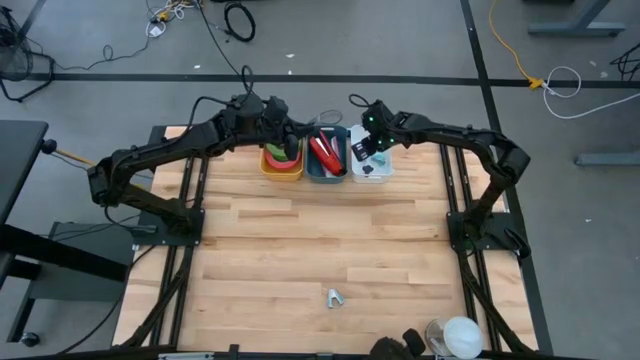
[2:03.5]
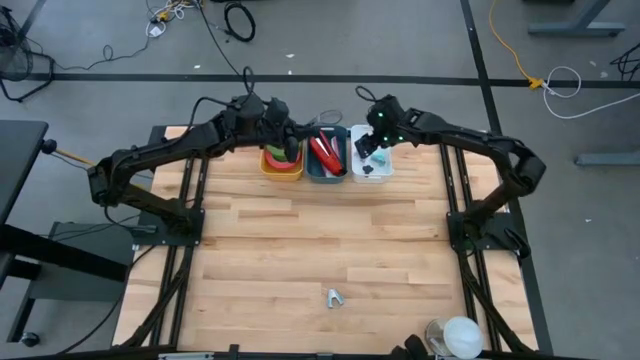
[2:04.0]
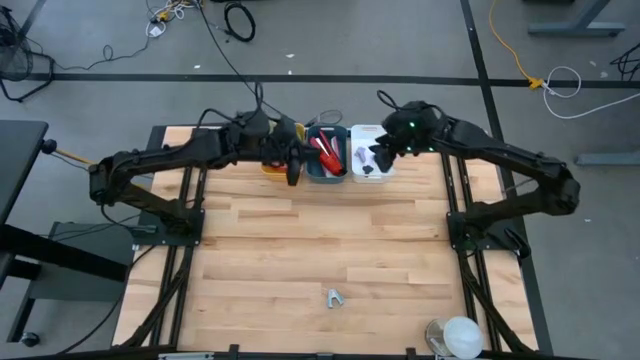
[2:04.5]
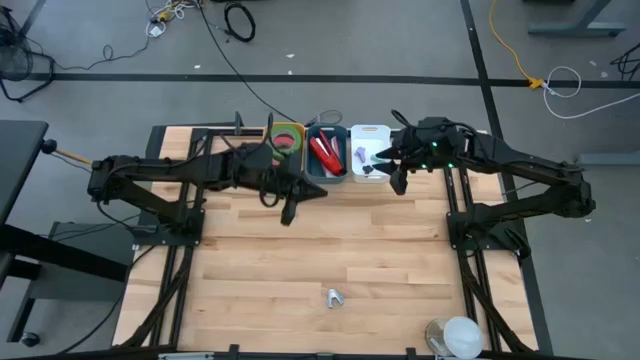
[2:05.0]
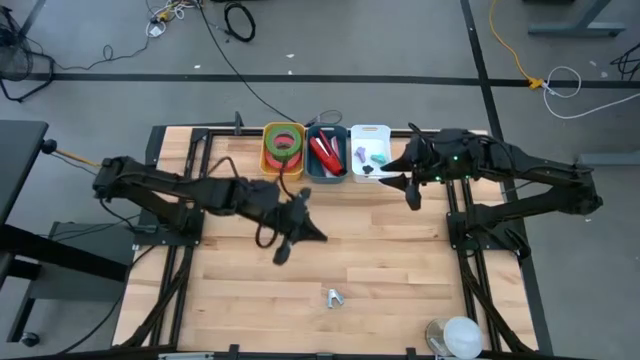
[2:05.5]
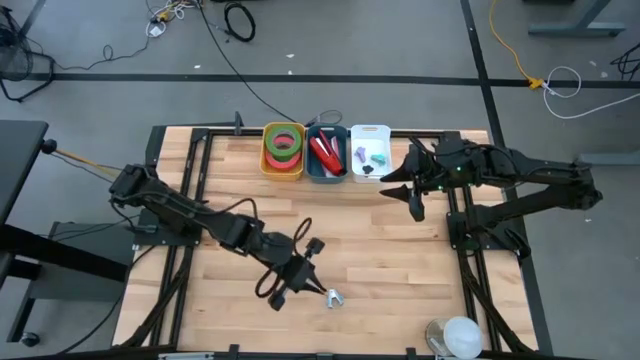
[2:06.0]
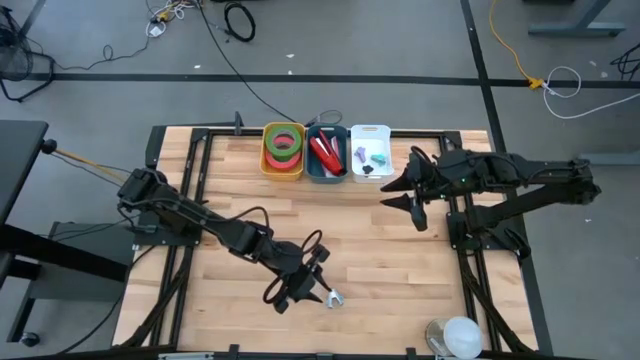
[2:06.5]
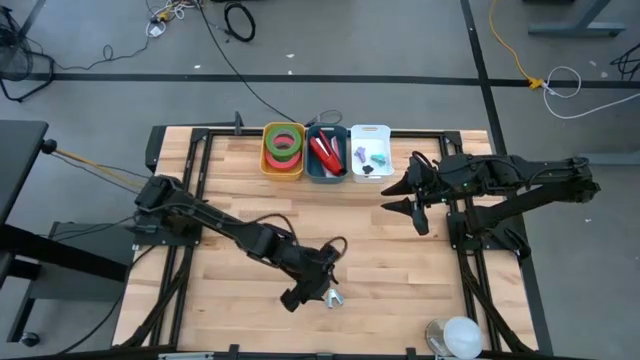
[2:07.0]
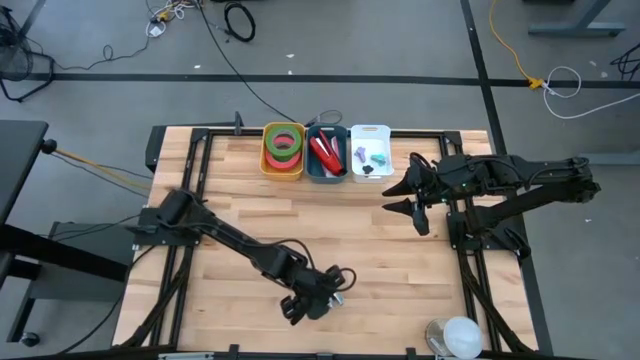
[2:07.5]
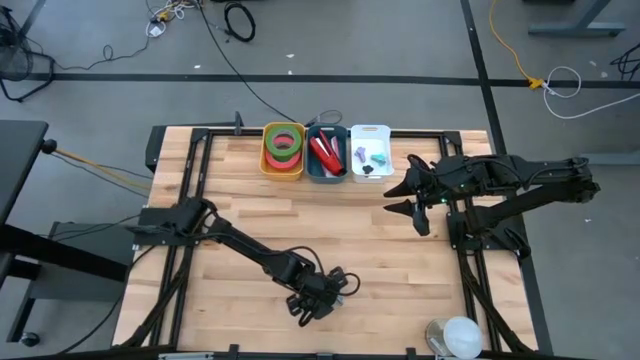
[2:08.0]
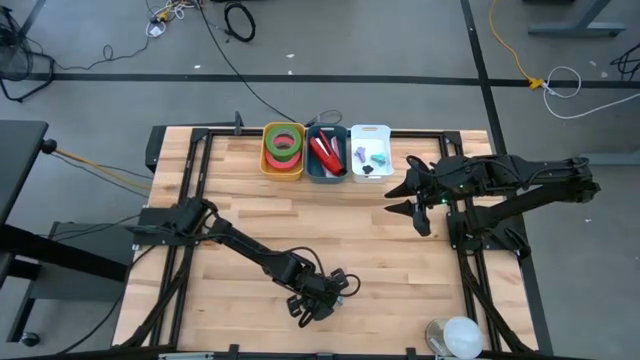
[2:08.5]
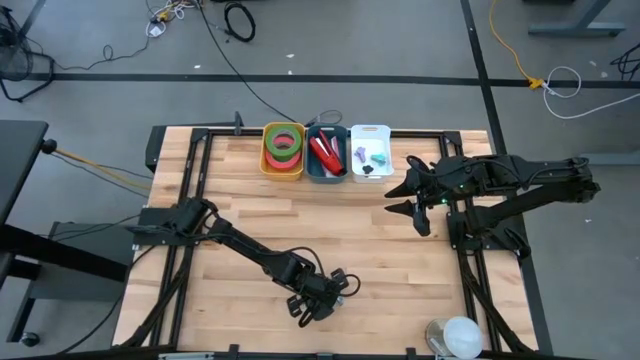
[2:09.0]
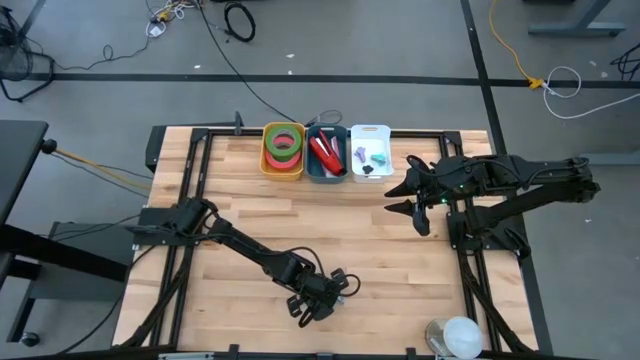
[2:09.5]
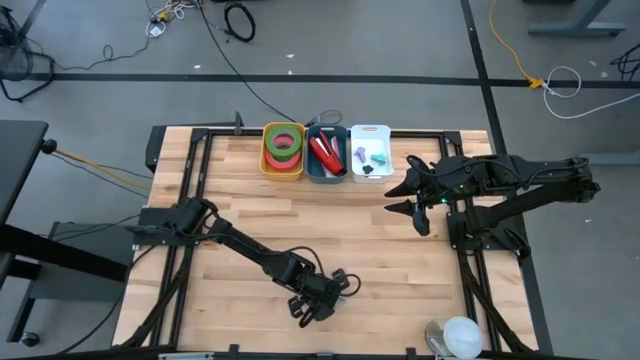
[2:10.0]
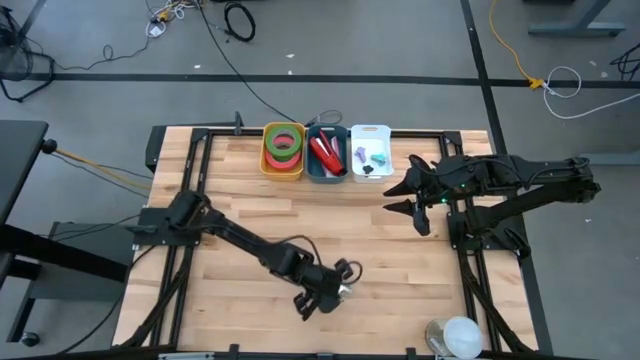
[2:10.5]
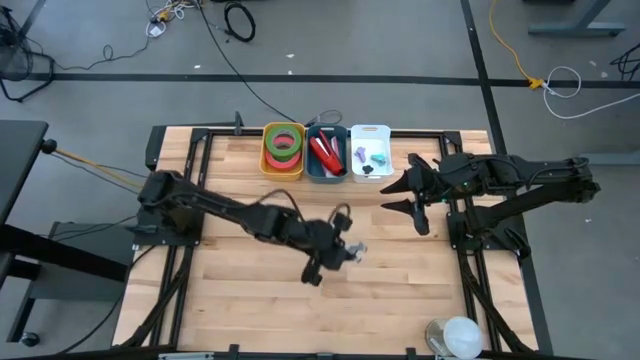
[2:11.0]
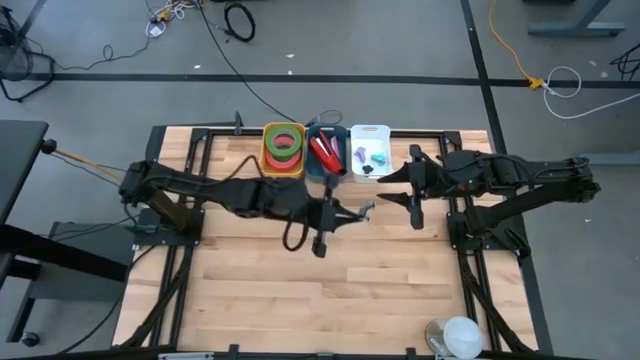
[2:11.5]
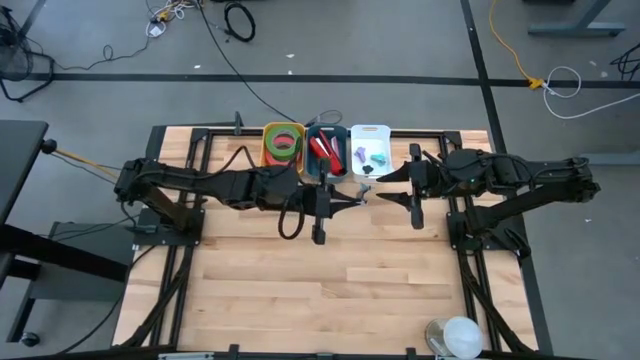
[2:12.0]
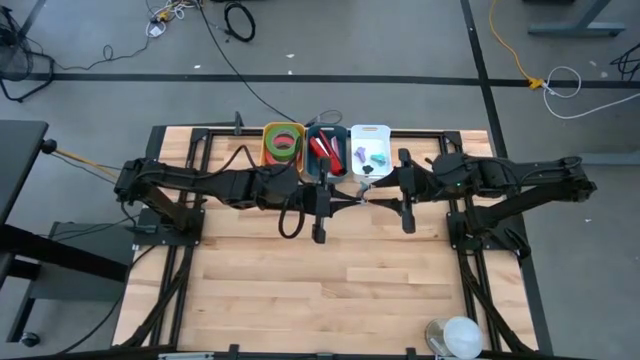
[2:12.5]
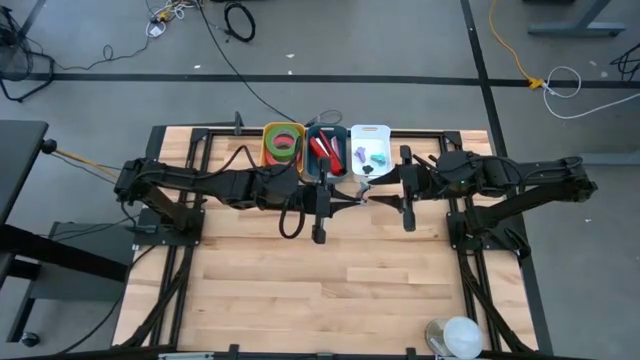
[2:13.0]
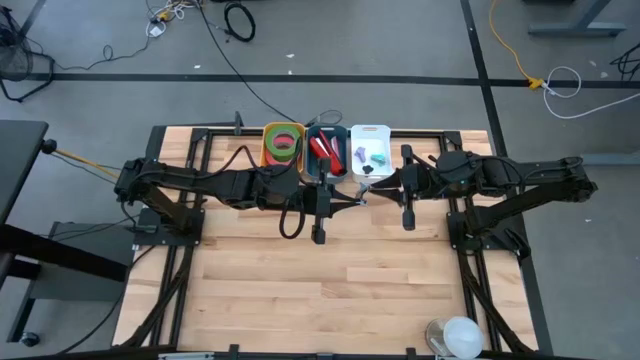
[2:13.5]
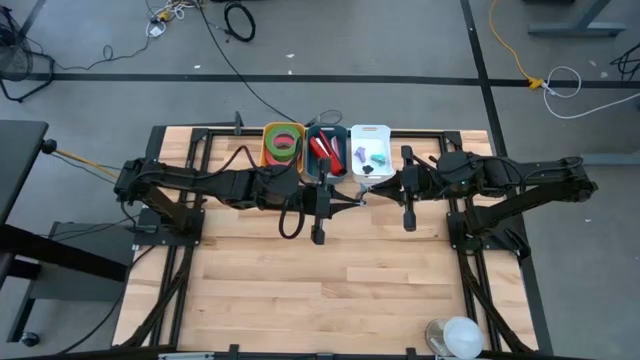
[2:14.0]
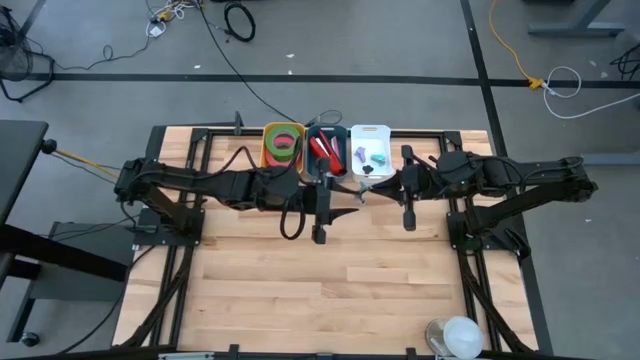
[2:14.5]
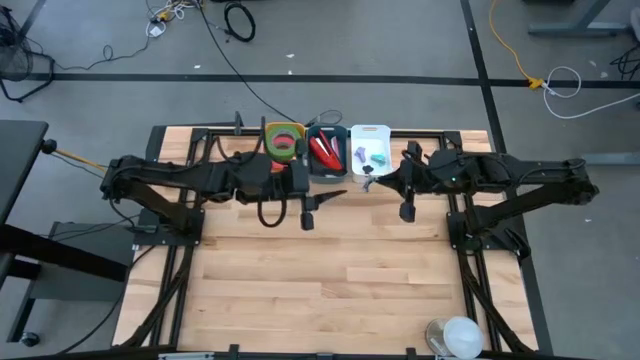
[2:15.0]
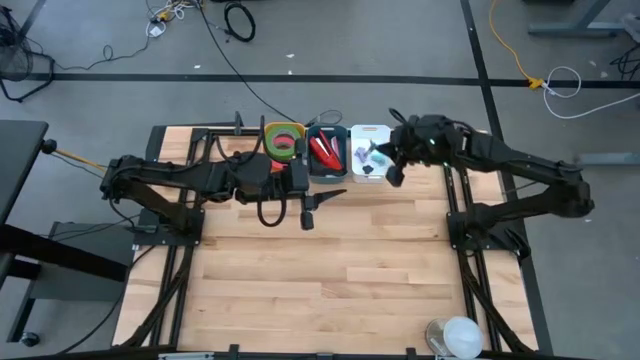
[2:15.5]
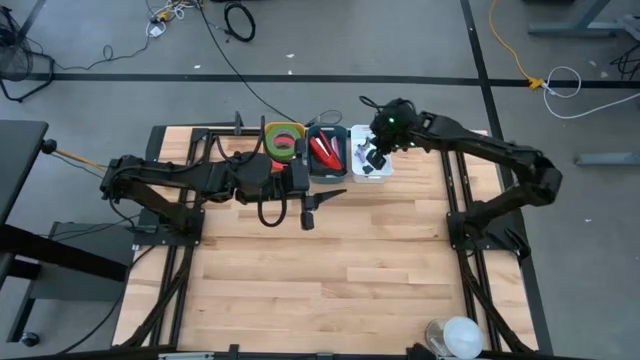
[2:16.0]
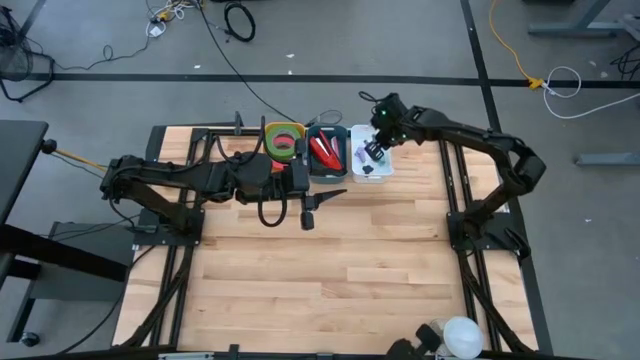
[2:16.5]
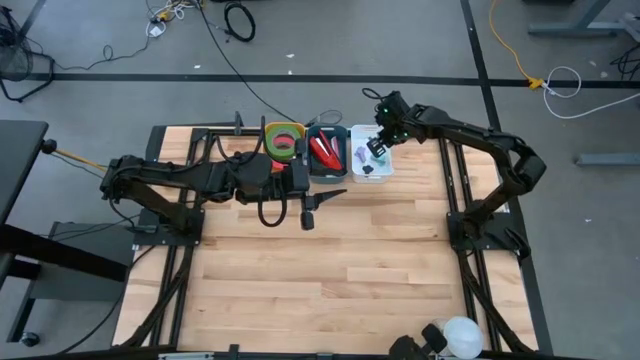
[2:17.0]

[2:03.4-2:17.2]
Task: Pick and place Stapler, Stapler remover, tape
Put the light blue staple remover into the white bin

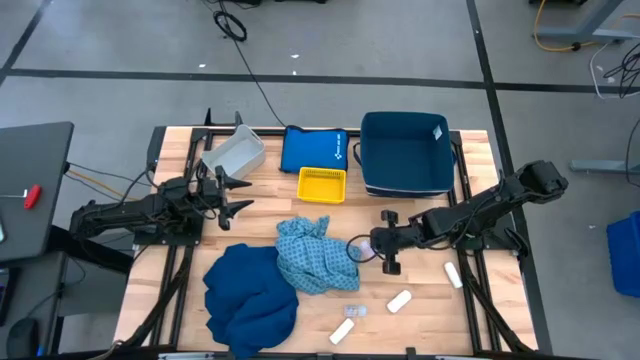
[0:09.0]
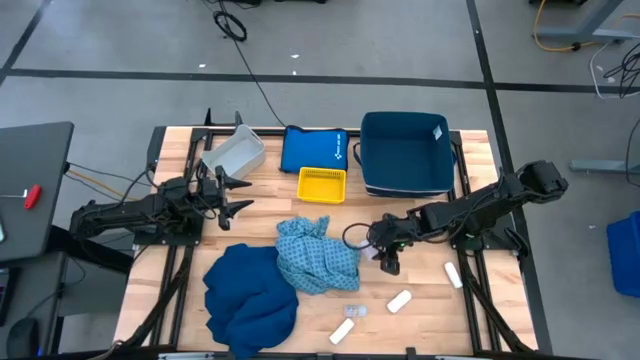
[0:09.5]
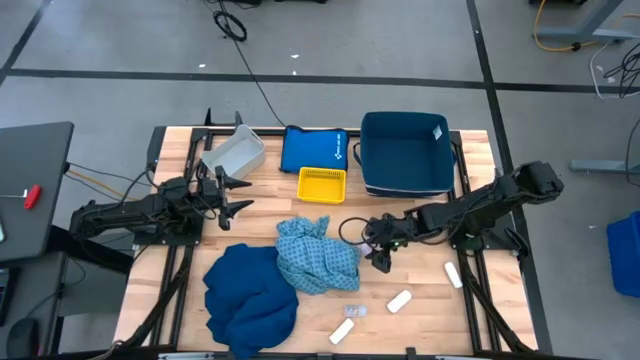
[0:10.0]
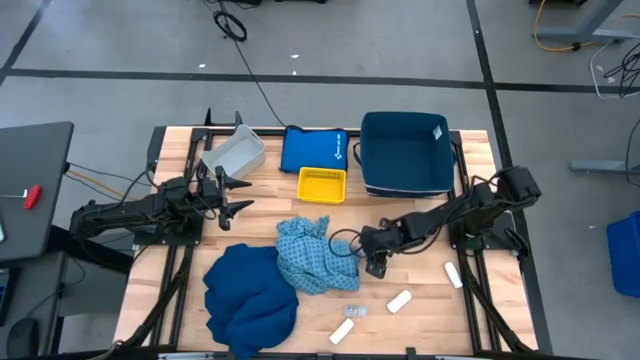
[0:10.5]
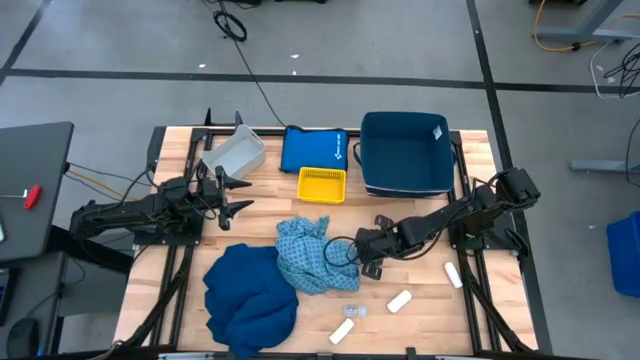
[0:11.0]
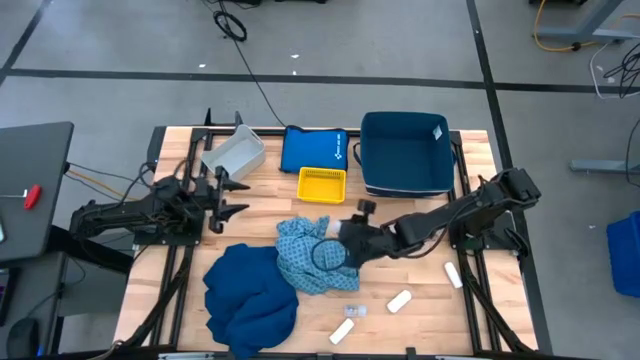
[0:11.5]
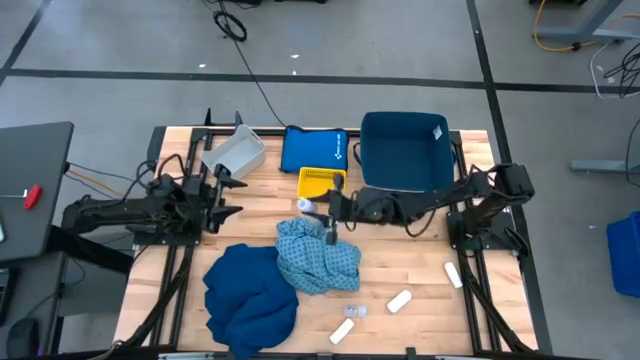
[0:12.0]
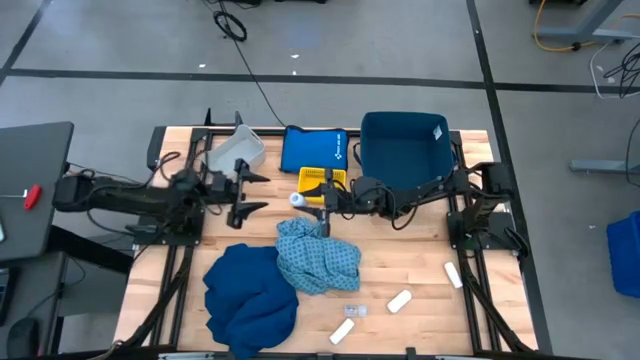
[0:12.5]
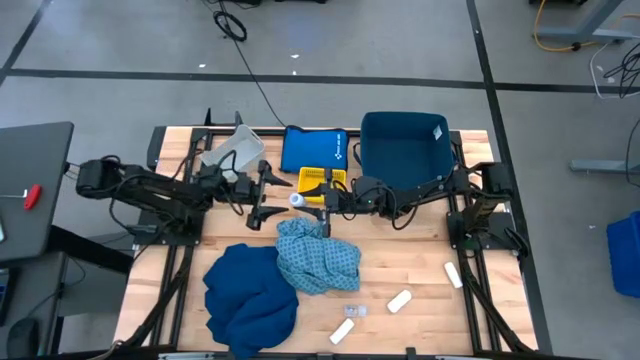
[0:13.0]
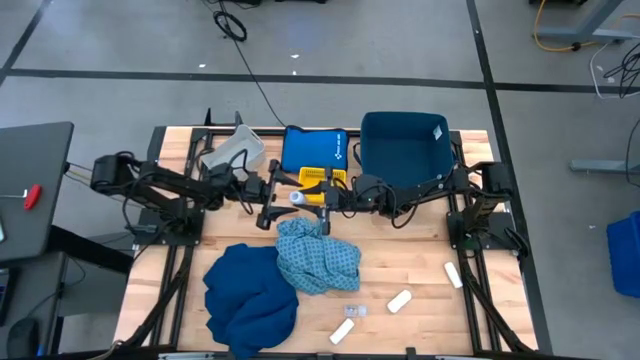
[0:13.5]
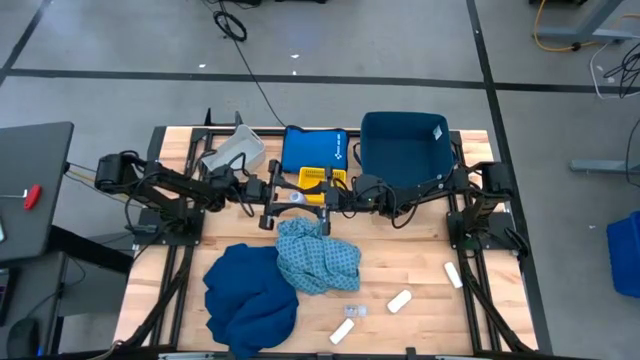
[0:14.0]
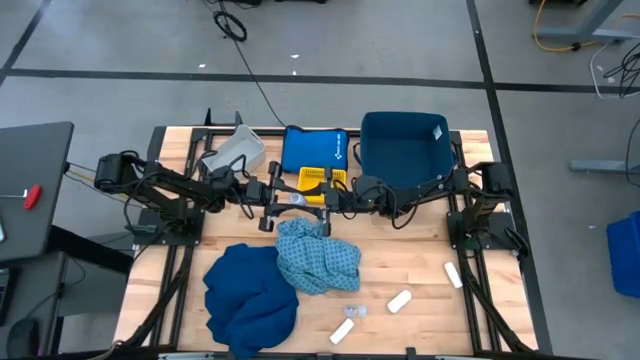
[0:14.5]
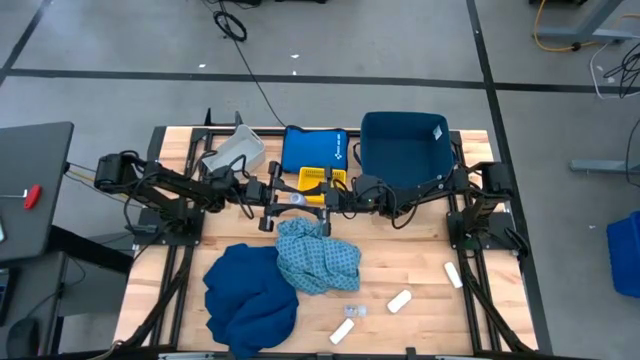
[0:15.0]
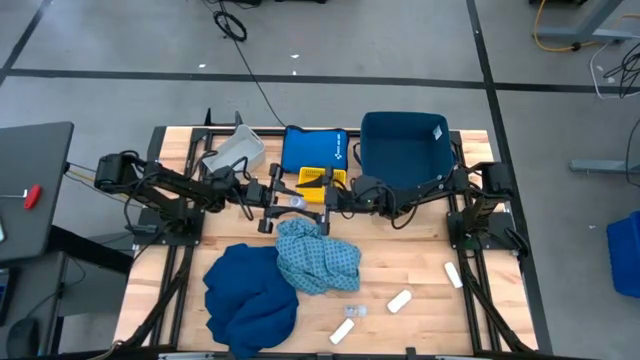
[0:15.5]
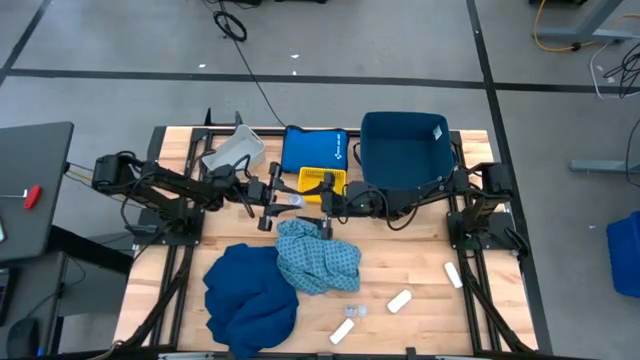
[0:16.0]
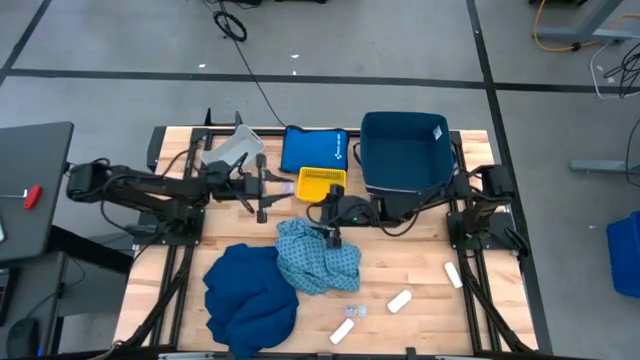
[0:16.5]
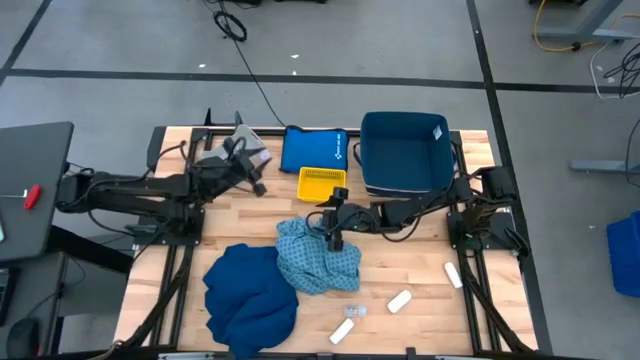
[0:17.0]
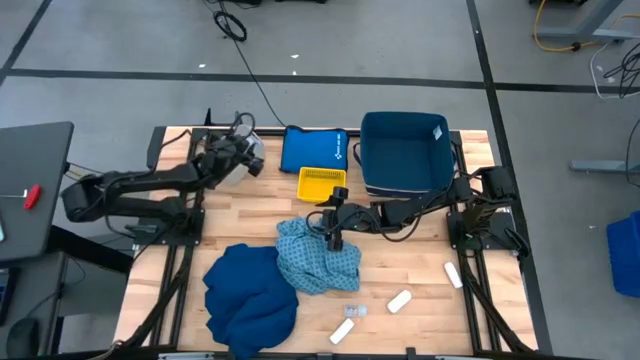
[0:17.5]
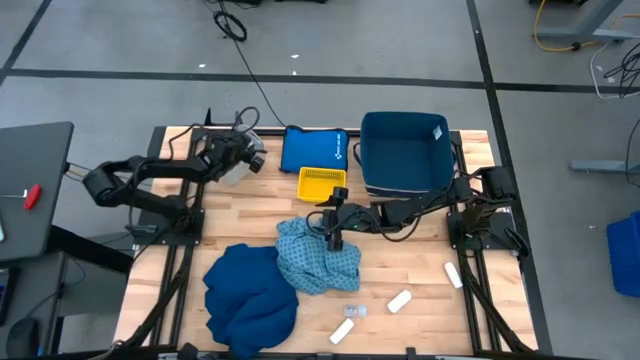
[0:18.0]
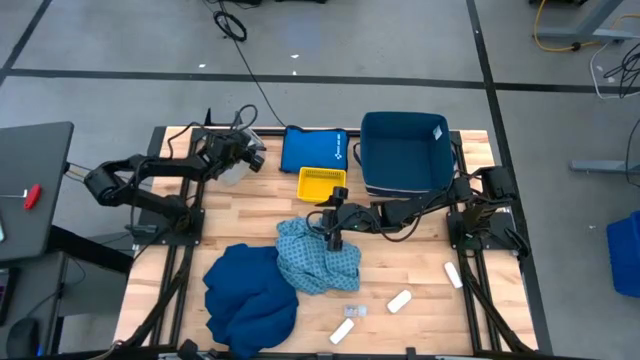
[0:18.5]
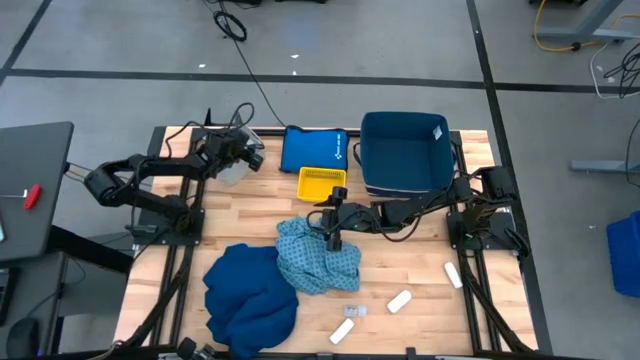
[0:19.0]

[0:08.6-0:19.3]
Task: Pick & place medical supplies in basket/bin
Put the top transparent pill bottle into the gray bin
